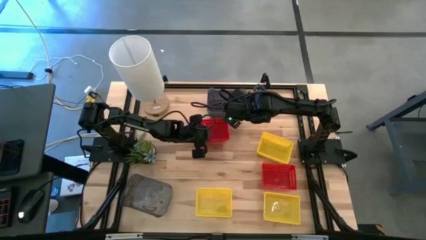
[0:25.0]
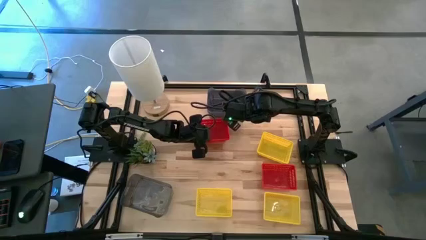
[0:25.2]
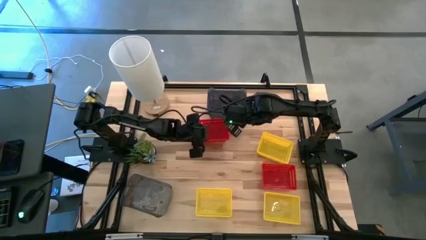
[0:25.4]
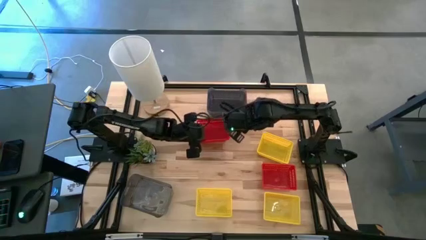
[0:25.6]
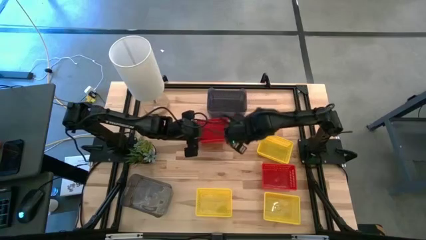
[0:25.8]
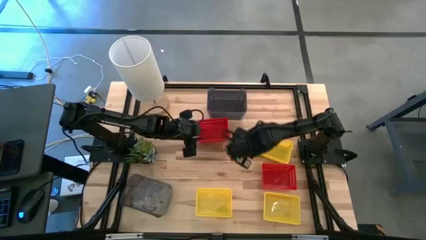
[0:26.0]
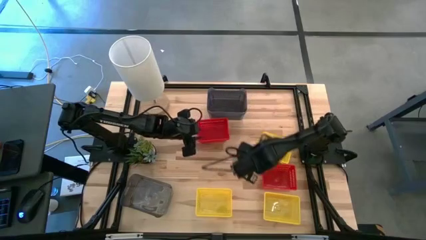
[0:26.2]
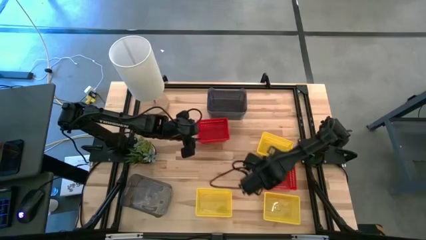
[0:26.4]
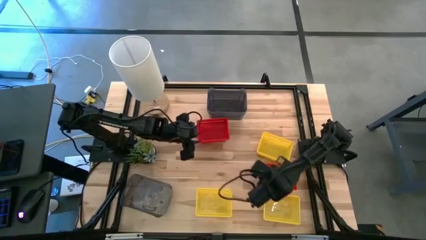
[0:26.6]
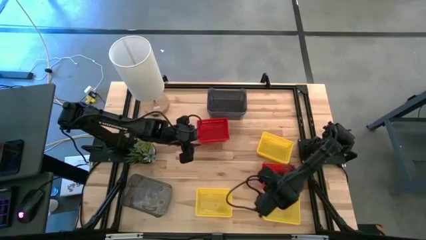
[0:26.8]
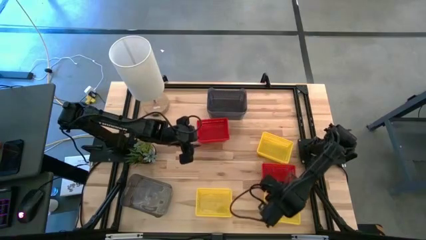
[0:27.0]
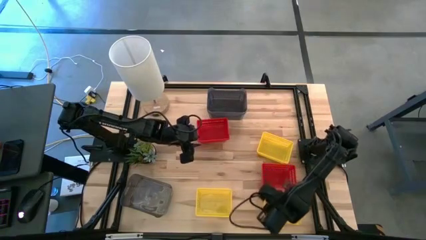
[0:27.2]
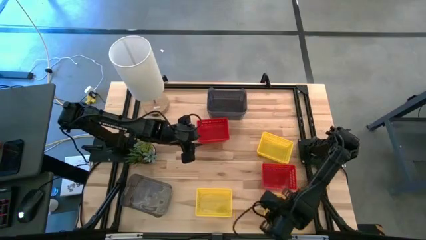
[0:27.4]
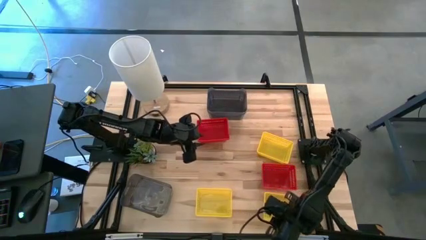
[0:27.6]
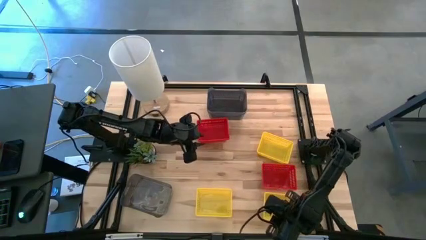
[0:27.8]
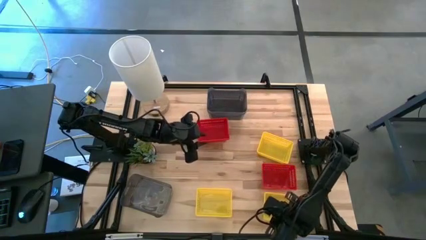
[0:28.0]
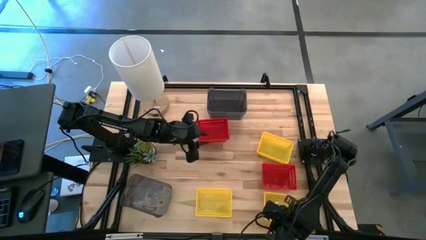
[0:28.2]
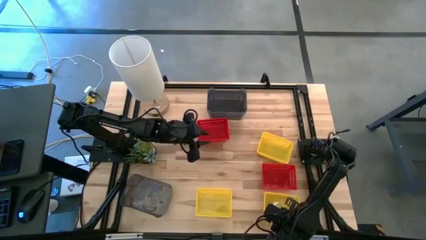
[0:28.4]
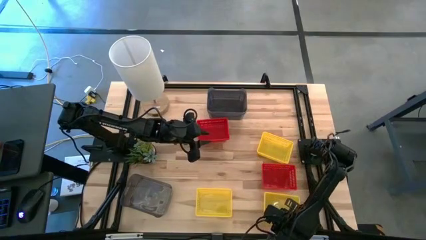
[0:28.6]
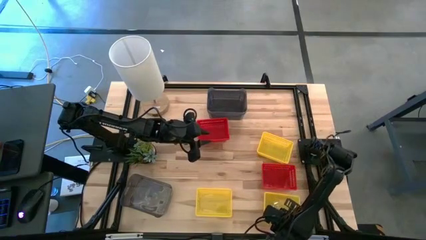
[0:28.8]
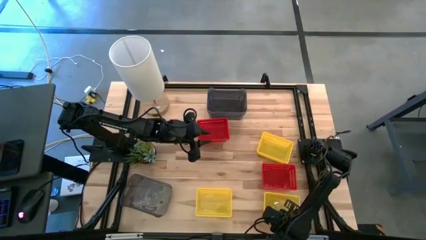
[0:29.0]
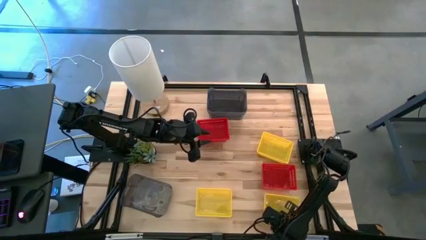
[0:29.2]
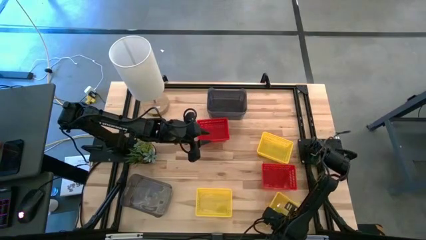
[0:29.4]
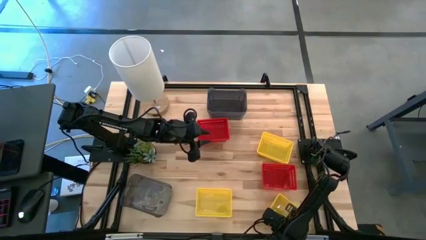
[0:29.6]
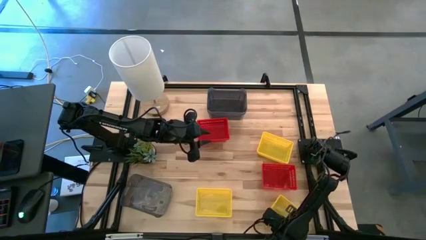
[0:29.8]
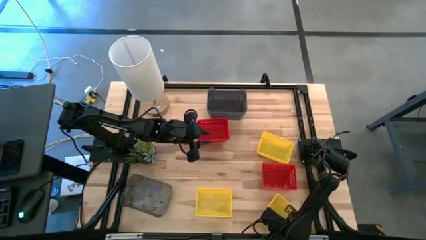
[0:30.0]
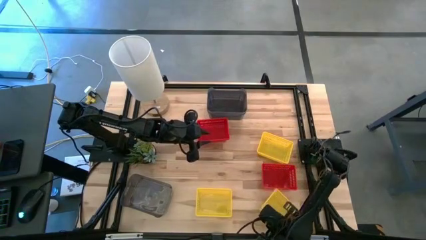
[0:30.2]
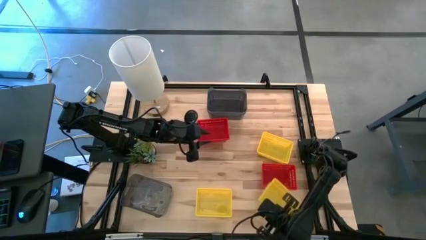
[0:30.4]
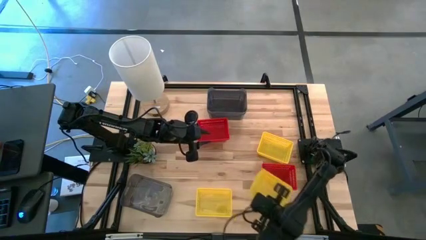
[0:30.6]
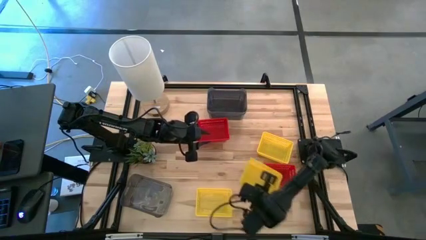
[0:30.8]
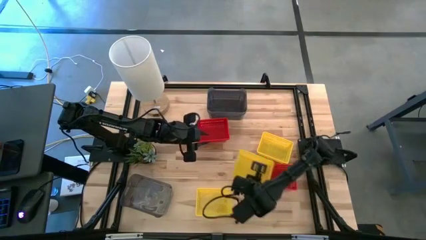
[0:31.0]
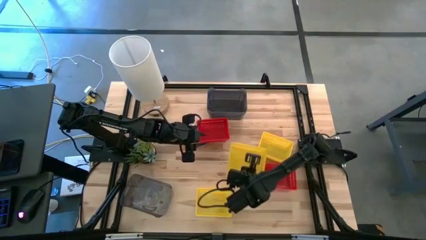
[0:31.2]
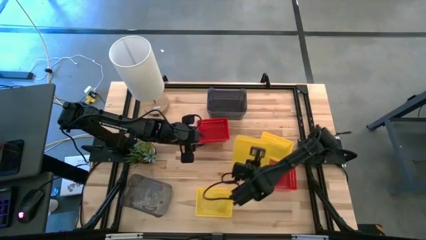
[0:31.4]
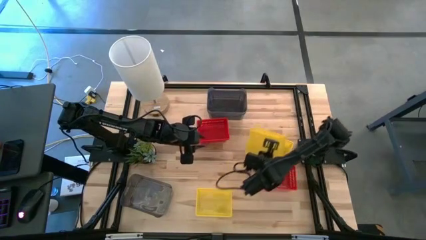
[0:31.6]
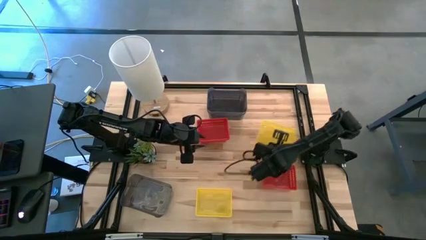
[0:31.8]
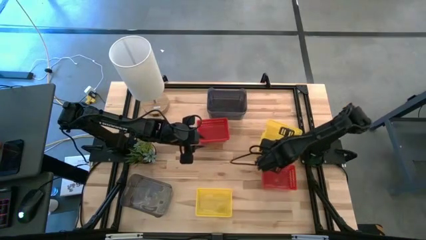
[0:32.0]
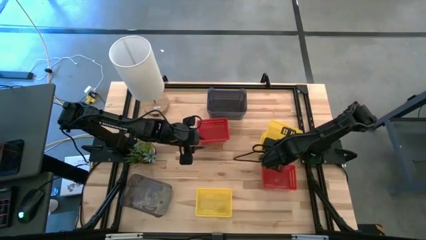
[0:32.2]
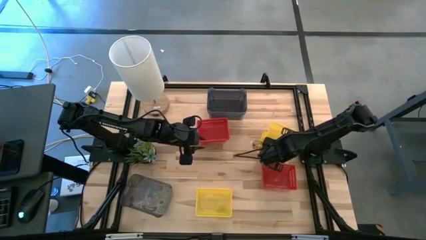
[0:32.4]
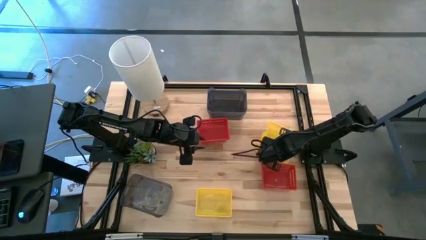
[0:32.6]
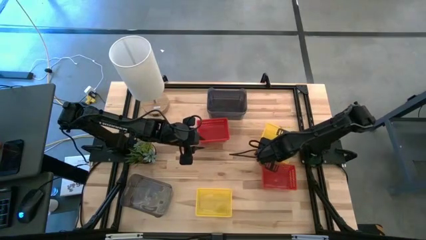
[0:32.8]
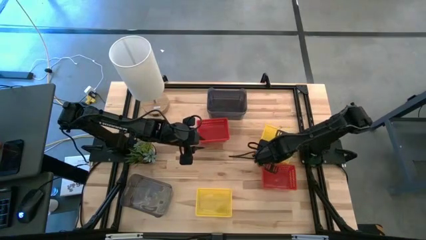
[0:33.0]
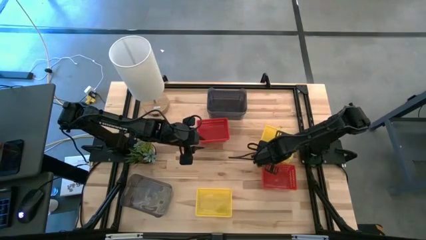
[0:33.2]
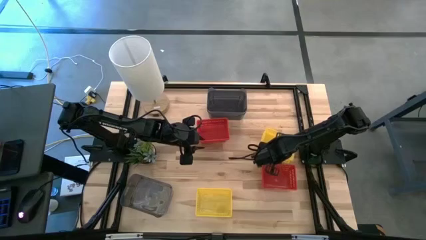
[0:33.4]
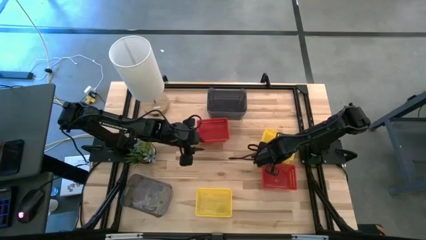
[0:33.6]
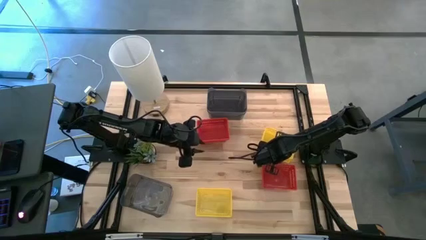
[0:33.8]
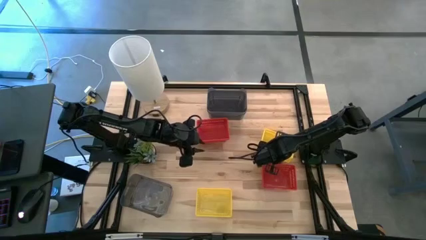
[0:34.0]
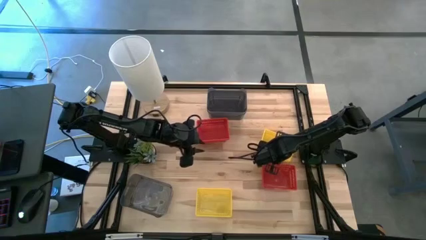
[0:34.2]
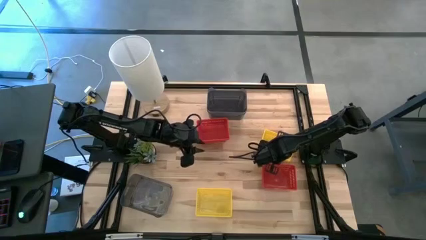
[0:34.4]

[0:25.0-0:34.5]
Stack the bottom right yellow bin on the top yellow bin

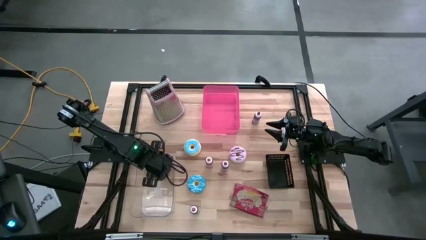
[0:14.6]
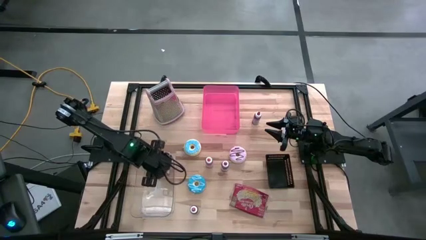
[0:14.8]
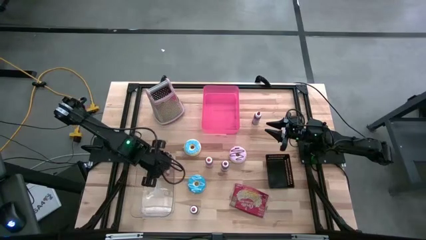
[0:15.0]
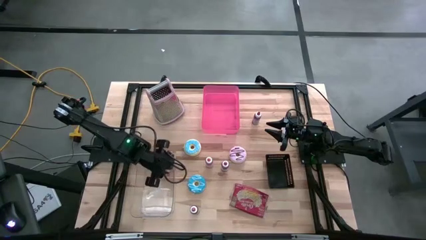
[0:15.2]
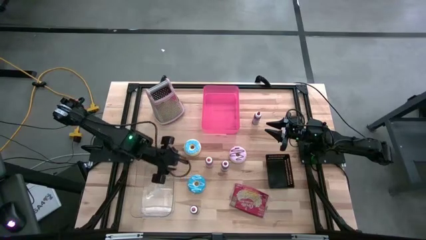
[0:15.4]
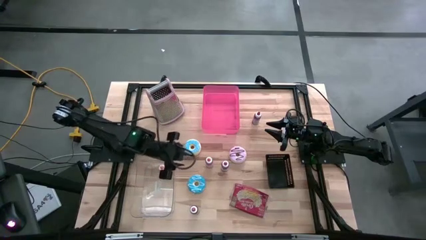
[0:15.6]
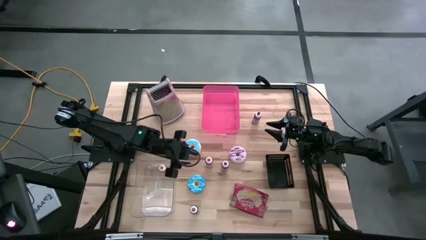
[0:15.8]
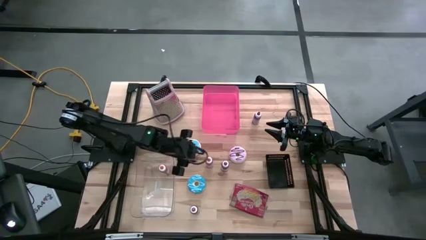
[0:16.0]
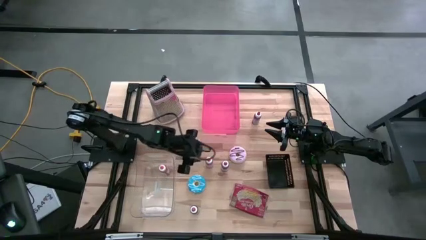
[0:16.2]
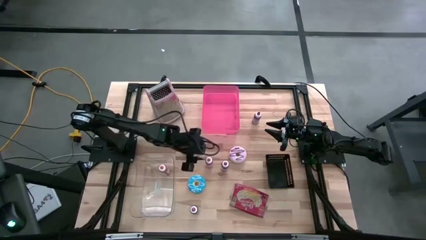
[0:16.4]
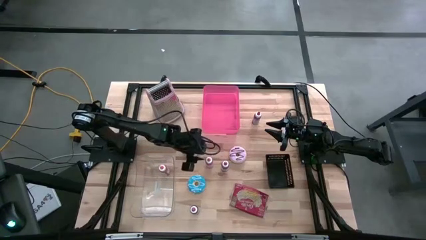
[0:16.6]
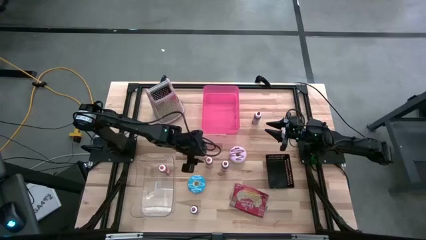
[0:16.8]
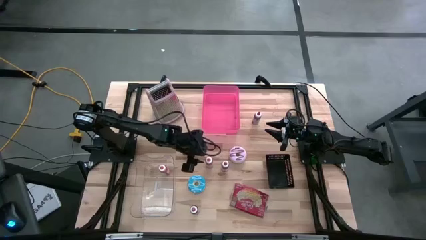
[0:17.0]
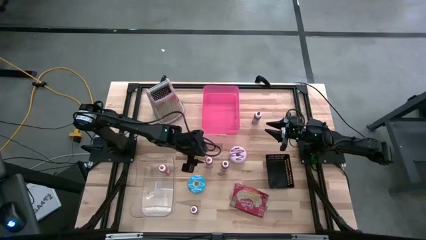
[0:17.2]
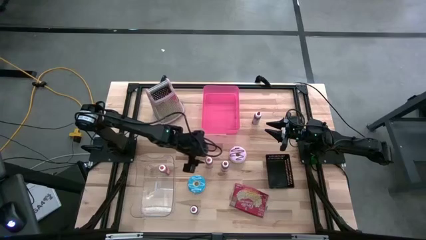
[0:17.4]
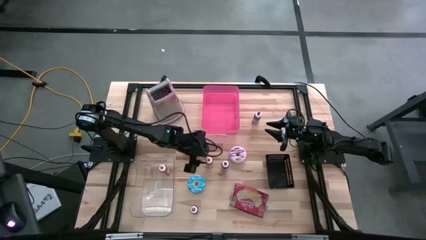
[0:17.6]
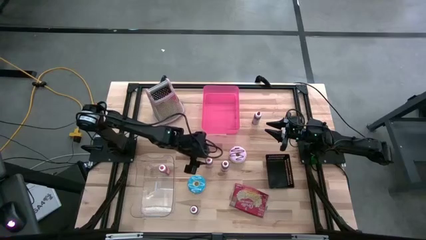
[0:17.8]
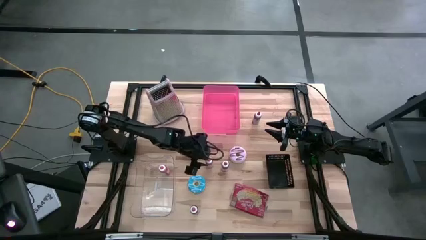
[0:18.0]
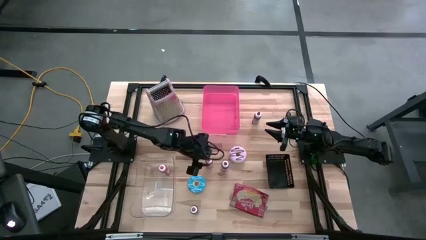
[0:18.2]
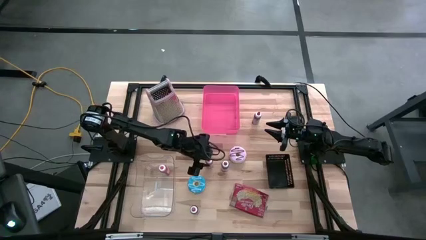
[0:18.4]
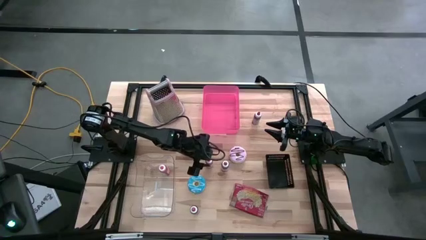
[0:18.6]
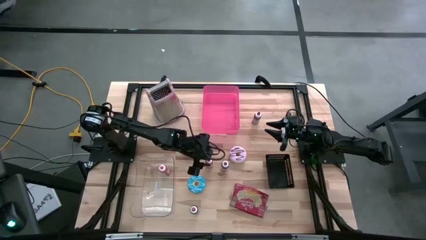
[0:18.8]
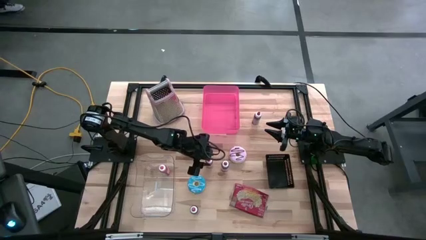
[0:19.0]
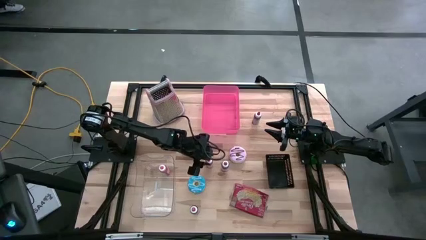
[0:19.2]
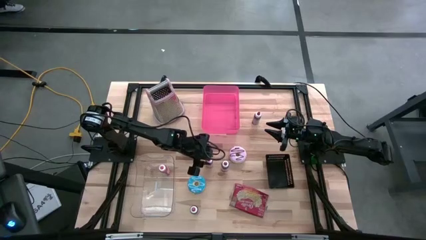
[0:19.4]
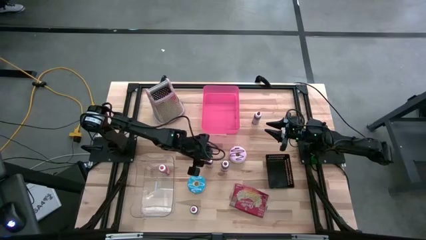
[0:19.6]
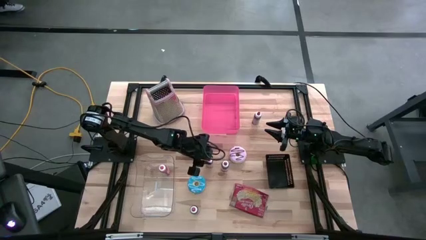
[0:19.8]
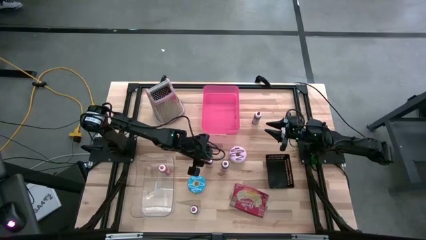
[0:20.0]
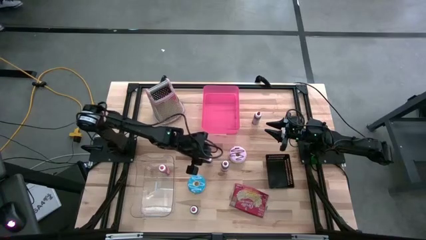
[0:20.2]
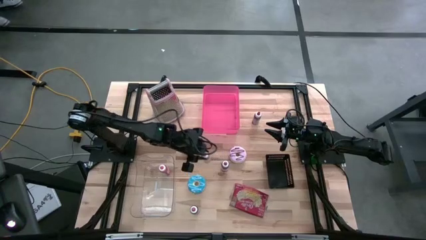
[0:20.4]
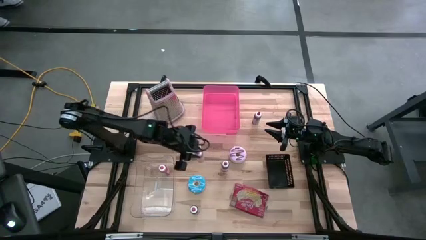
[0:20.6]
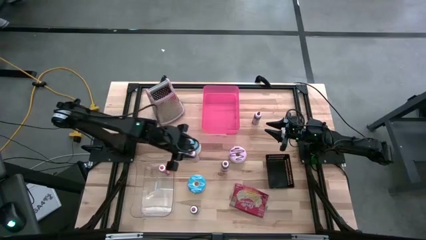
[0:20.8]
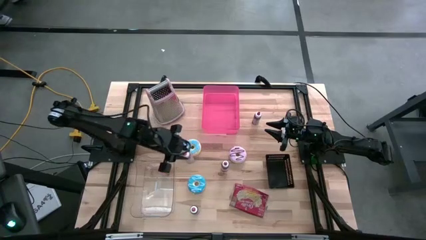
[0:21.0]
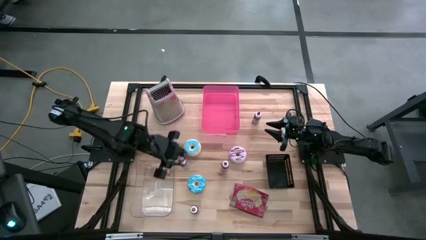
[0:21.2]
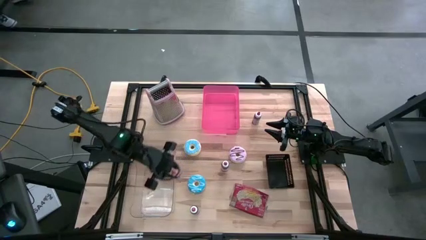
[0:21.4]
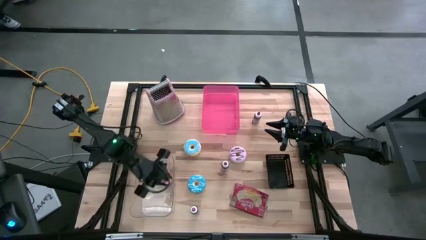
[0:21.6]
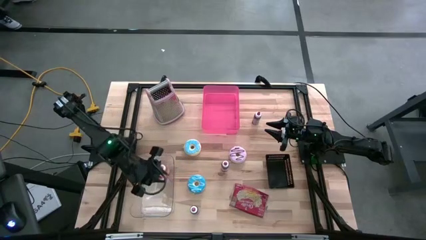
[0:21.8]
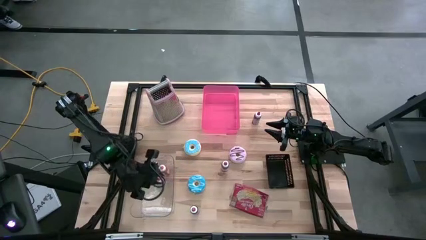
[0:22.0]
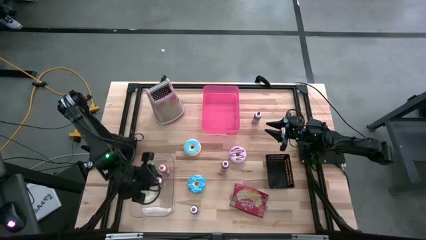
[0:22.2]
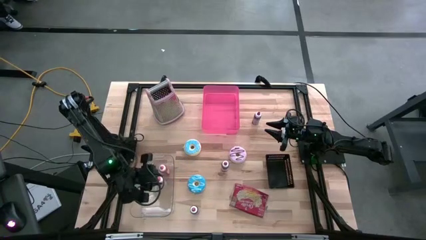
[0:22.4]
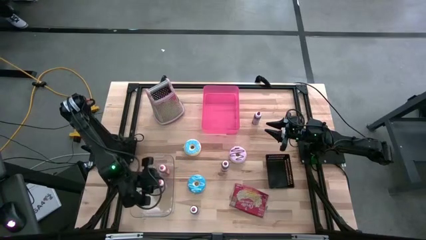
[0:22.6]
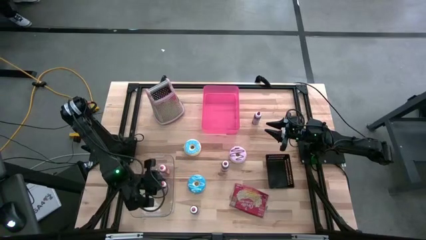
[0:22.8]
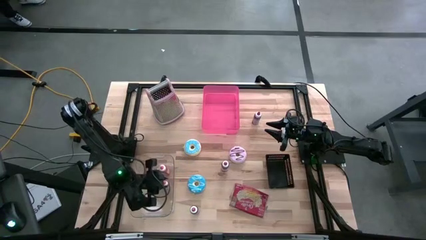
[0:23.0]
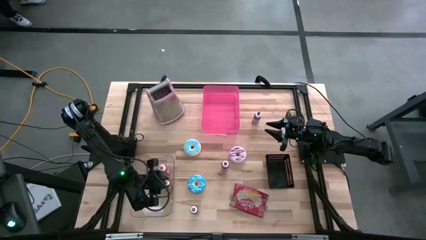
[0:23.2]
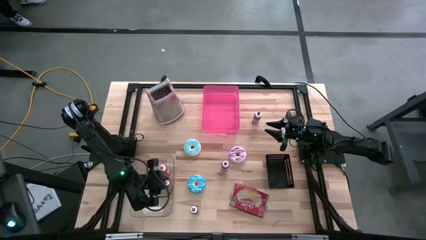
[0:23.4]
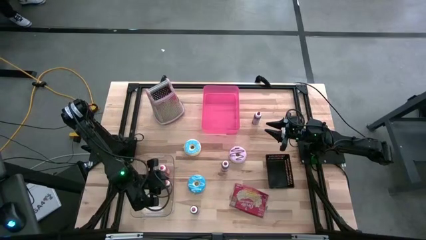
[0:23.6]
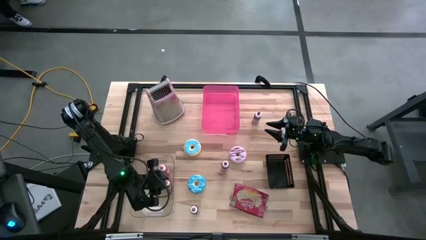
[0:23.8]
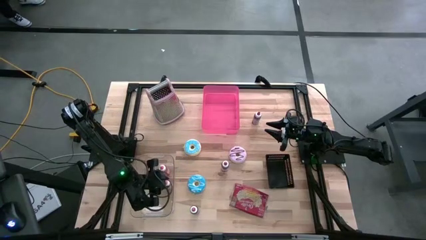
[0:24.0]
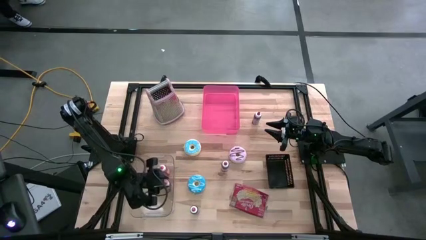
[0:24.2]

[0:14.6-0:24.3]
Put the middle left orange large food coloring bottle into the transparent bin
